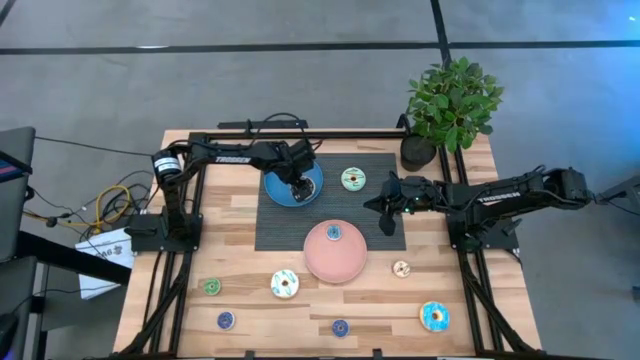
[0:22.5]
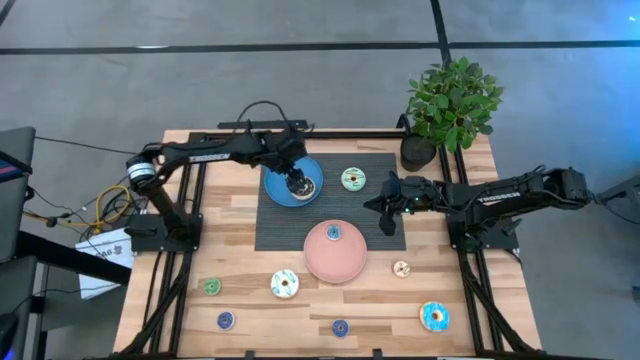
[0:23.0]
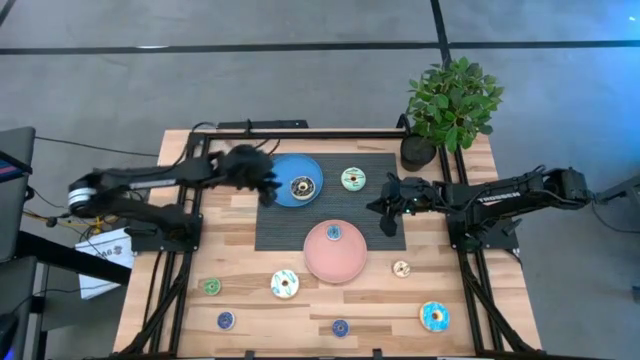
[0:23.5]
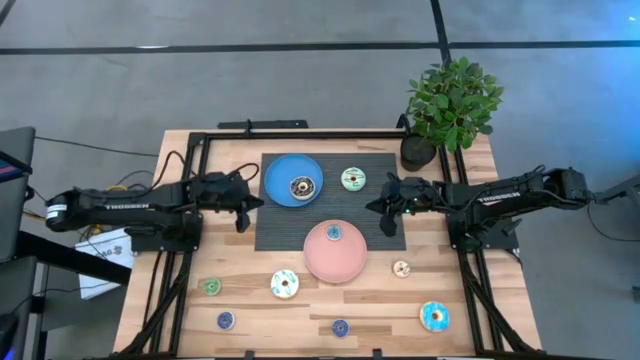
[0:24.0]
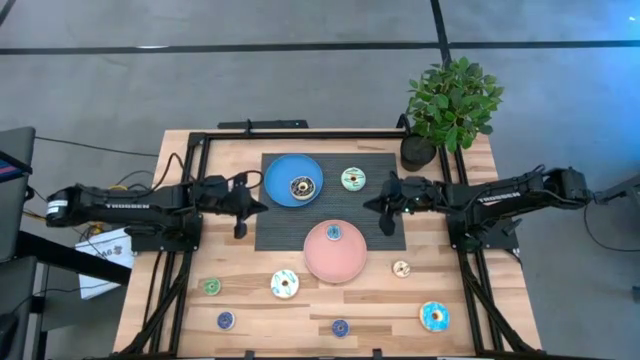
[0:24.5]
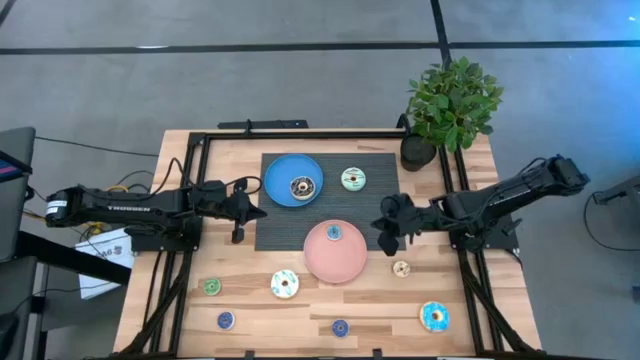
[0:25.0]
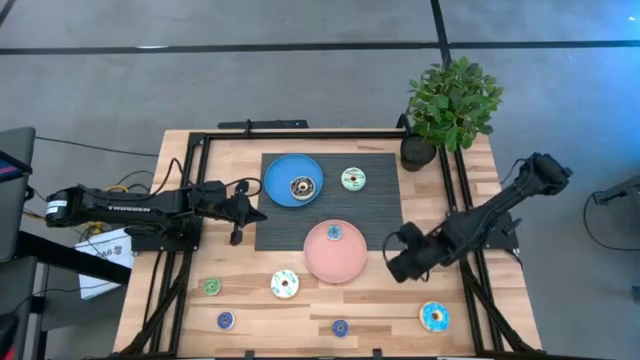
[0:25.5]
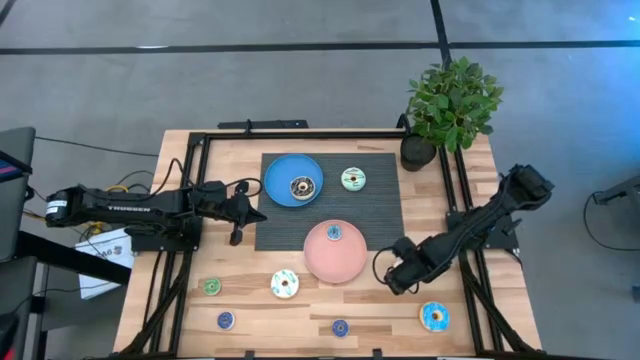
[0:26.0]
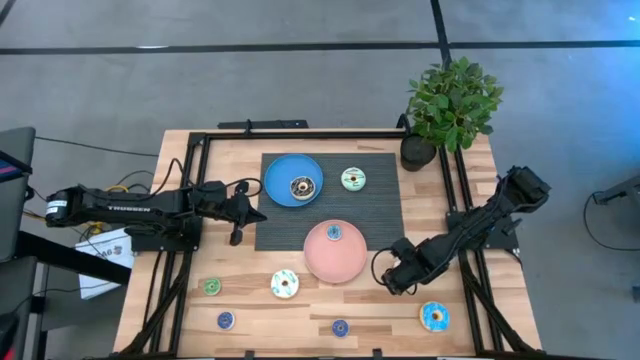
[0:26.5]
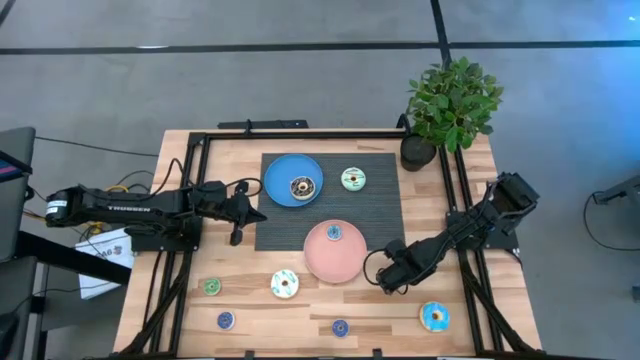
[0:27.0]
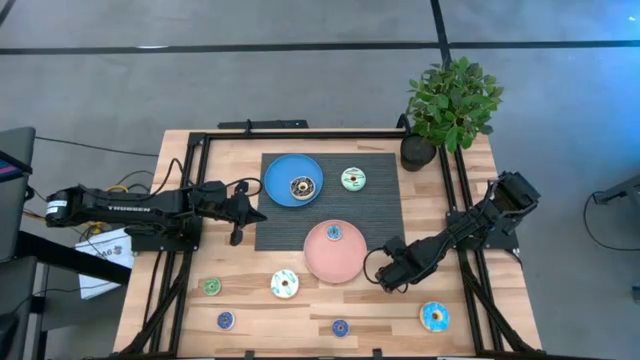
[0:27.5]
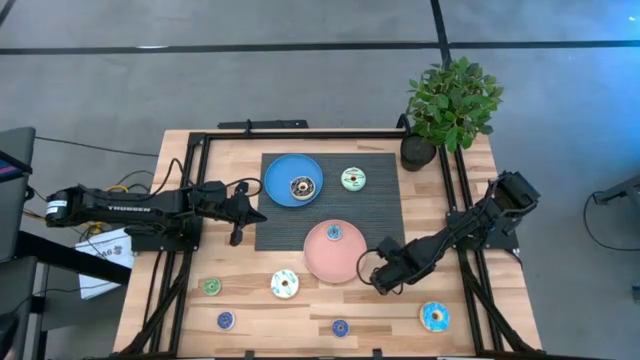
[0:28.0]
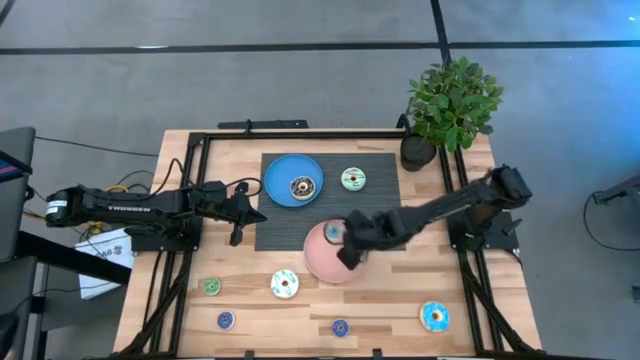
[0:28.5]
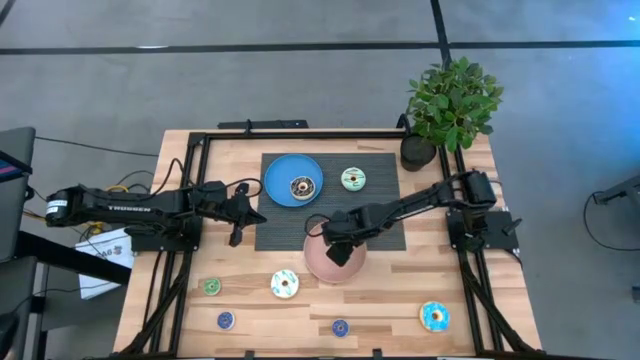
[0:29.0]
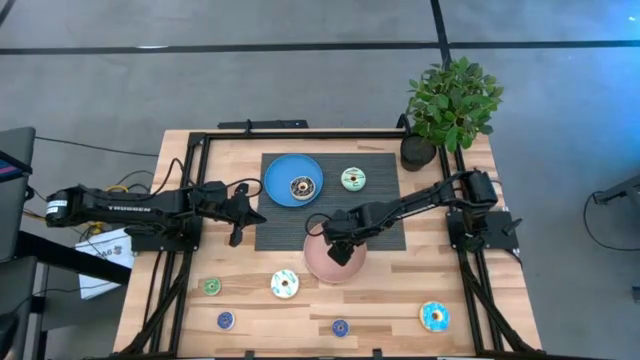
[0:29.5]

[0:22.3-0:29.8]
Task: Pick & Place donuts
Put the small white donut on the pink plate

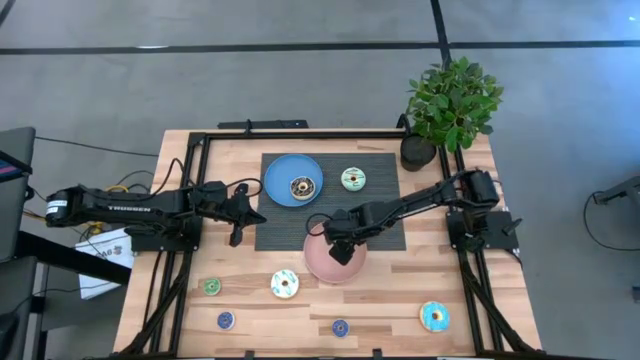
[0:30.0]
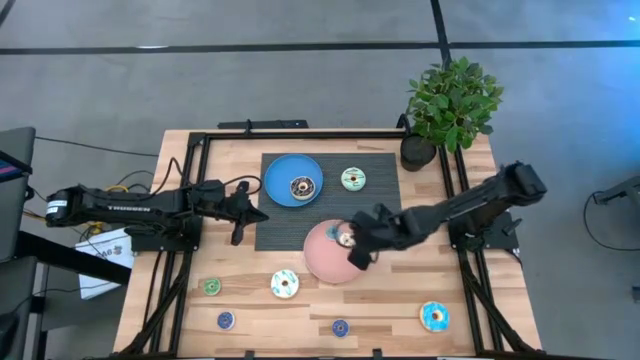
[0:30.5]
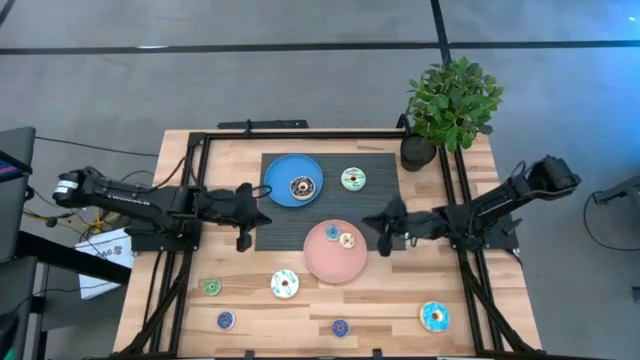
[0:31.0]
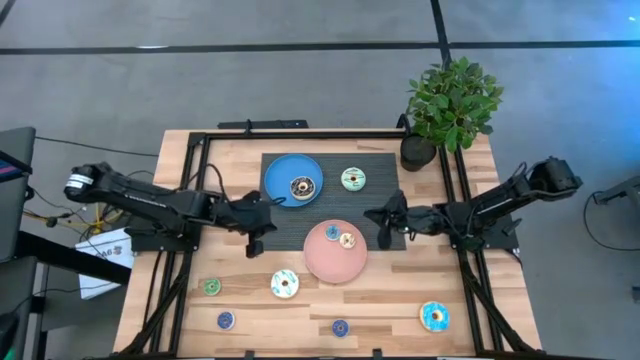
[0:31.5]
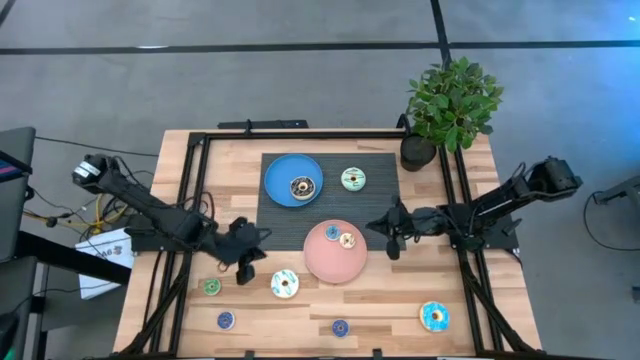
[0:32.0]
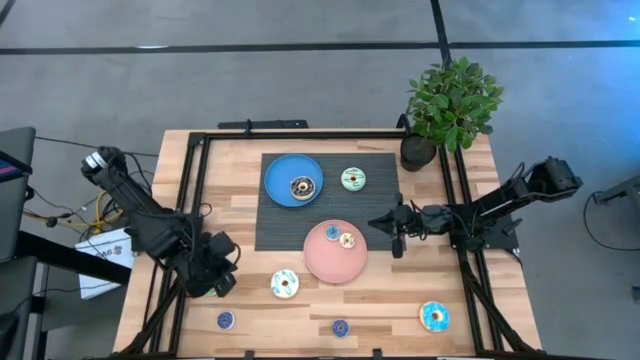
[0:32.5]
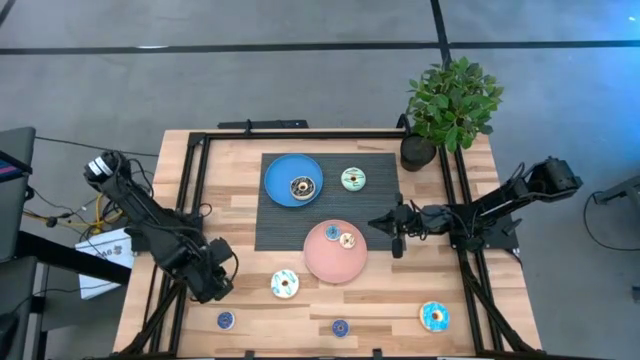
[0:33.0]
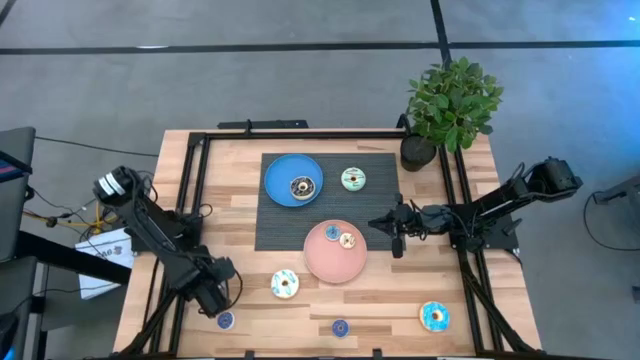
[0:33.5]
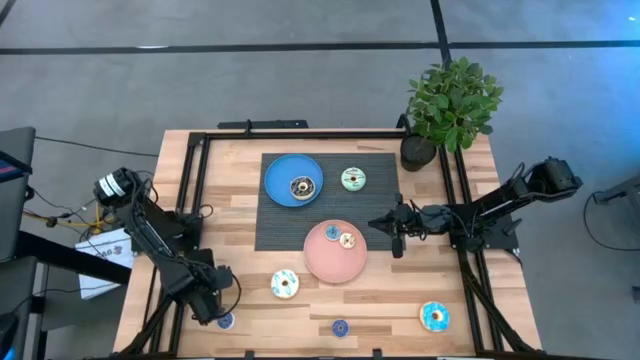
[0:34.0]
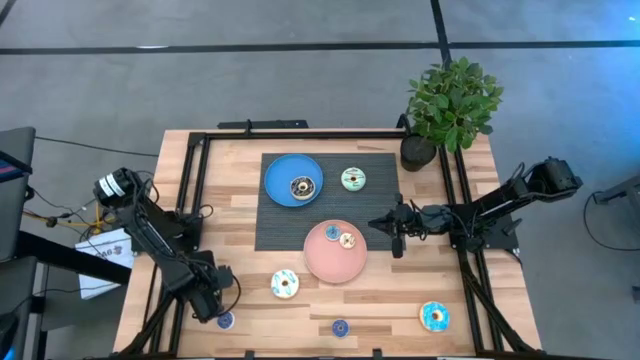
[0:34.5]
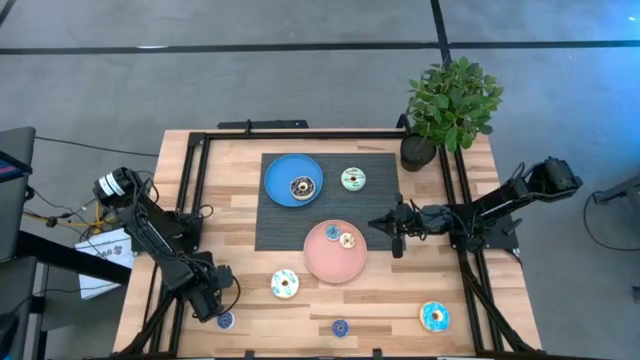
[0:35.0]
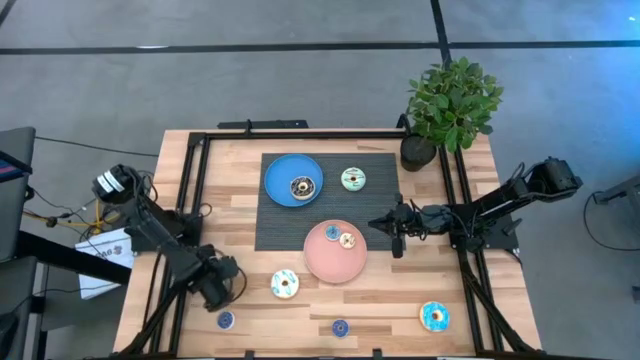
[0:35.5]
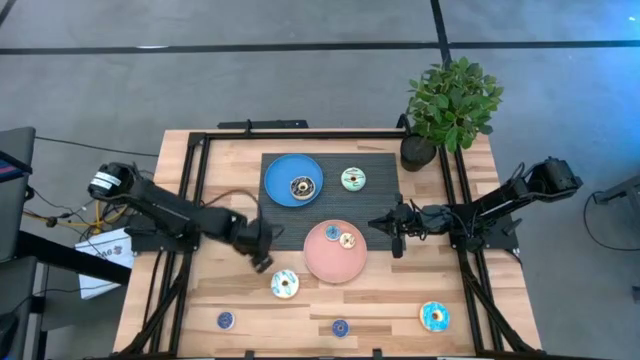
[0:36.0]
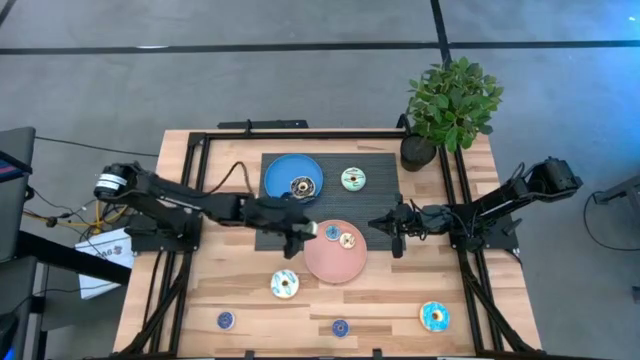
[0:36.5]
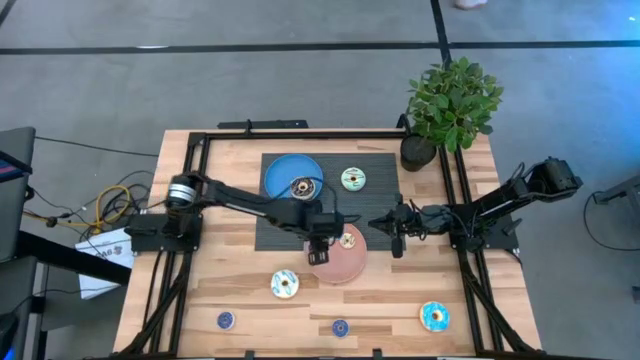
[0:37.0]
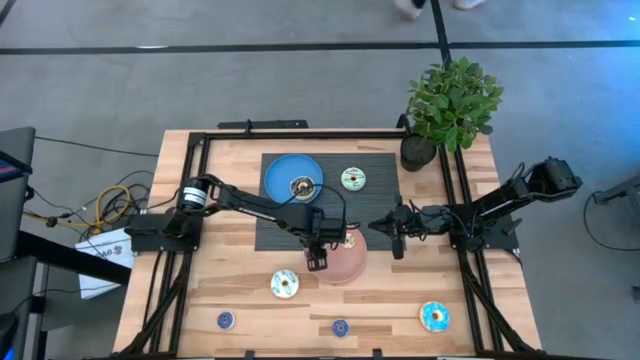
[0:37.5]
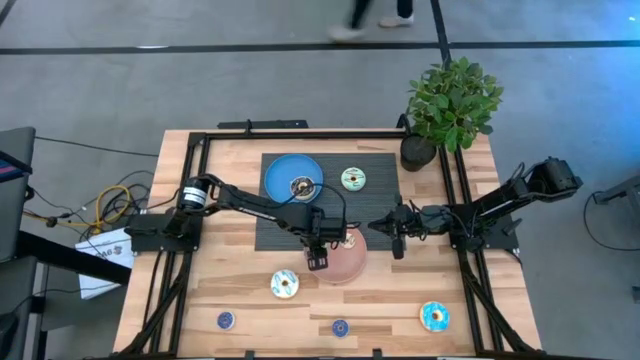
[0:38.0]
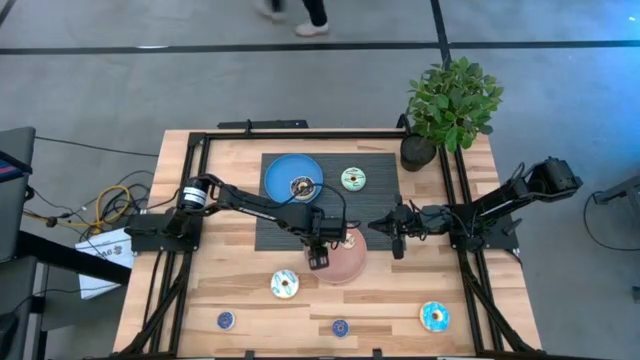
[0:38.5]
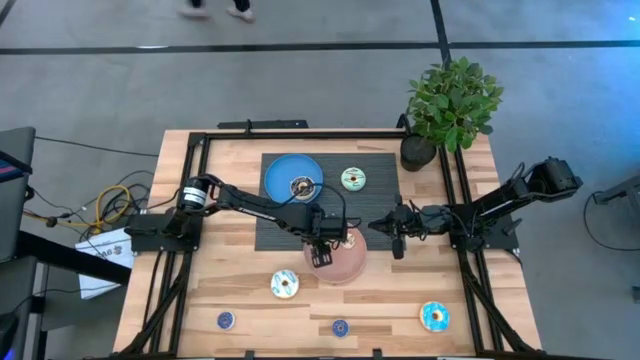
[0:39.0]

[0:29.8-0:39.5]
Put the small green donut on the pink plate

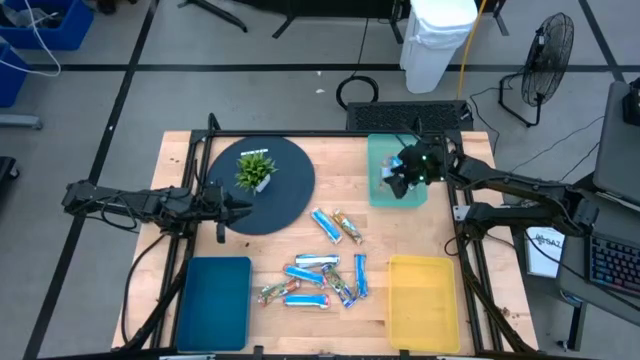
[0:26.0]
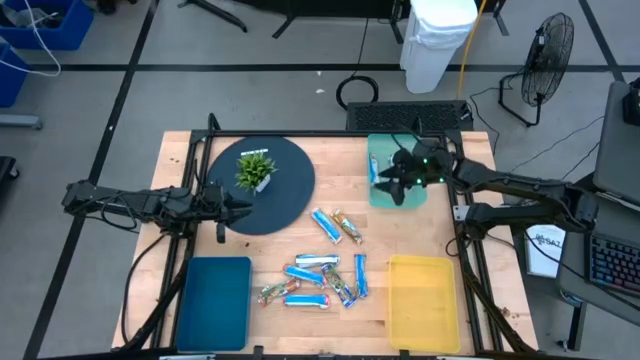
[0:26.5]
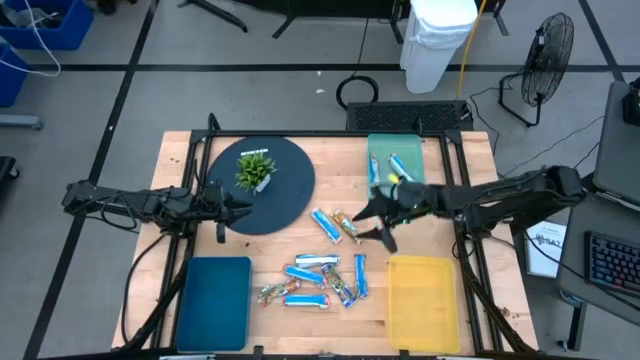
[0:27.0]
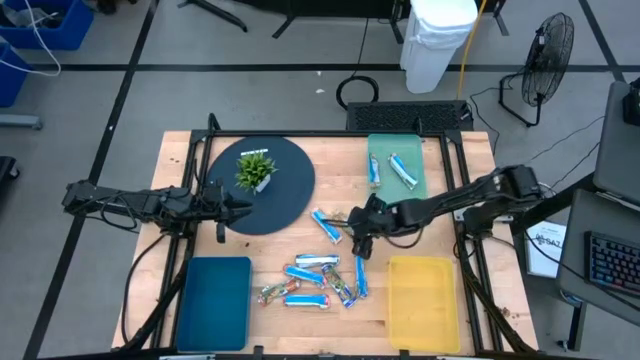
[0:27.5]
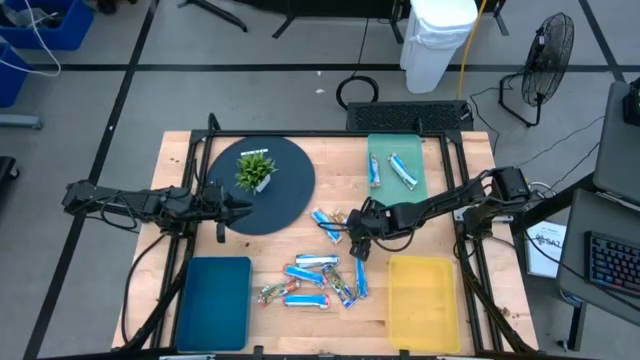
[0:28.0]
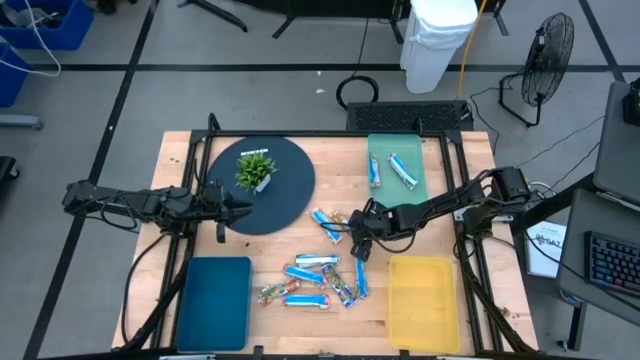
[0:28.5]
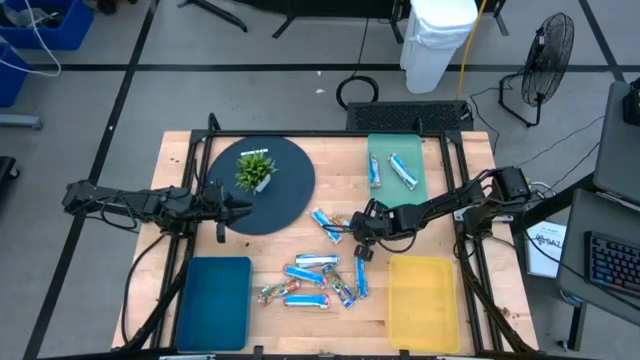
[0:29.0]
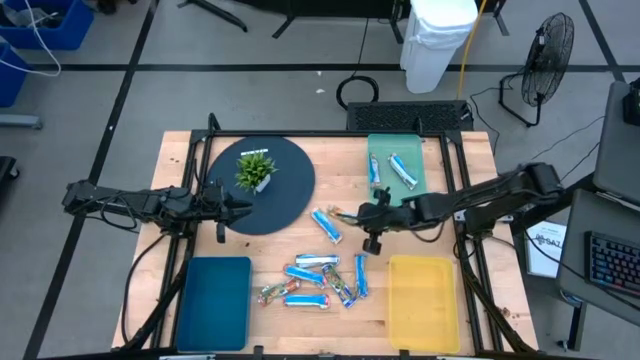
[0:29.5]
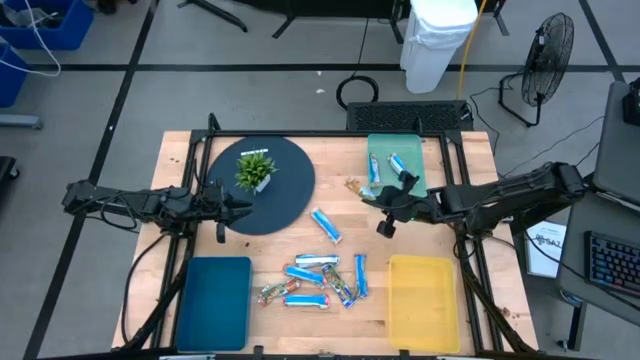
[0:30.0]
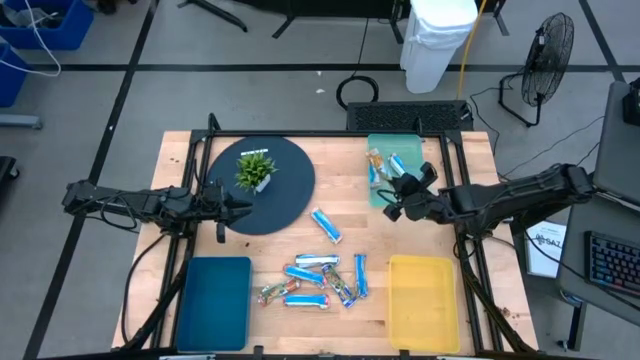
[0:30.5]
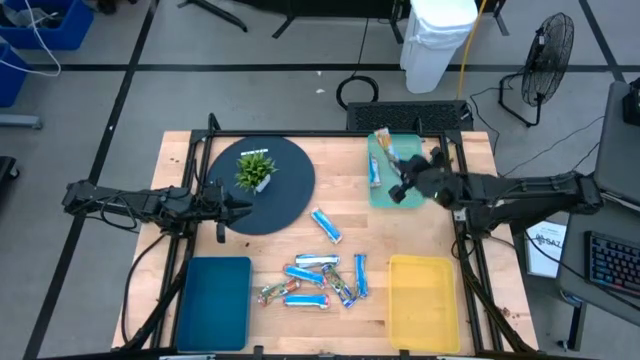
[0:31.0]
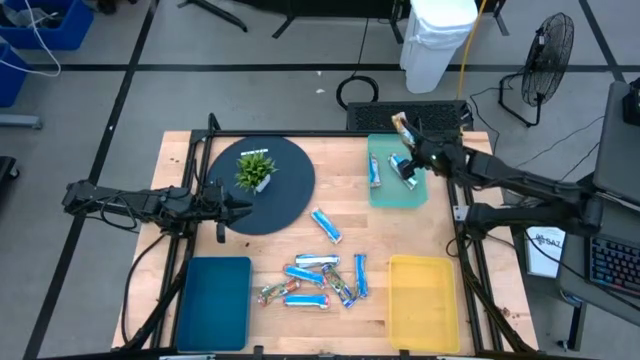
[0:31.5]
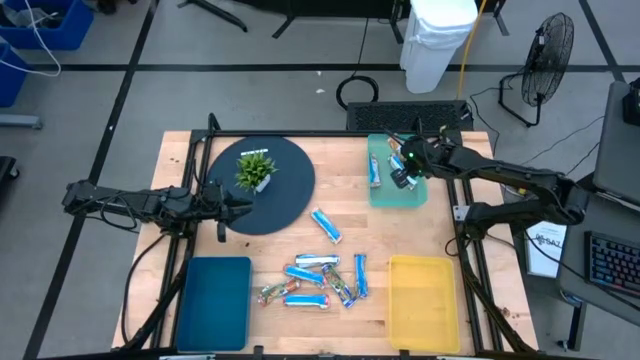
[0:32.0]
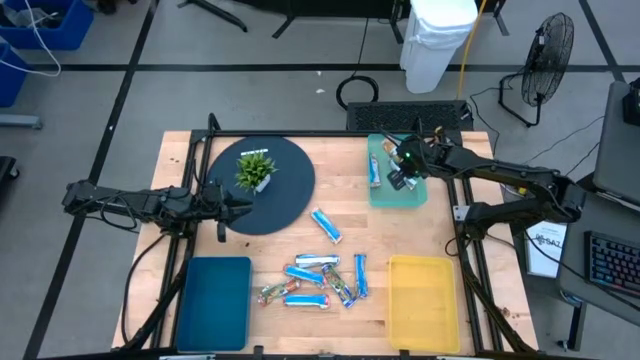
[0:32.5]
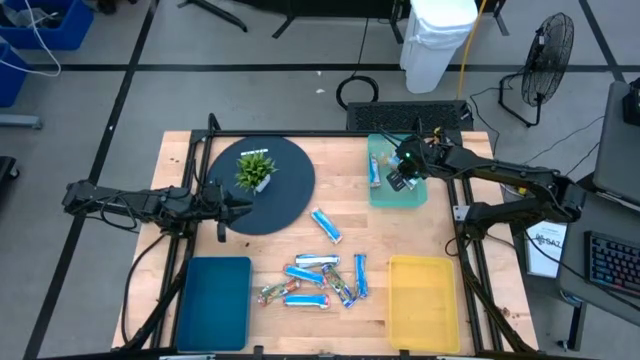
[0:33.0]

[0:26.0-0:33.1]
Task: Pick and place Granola Bars by type
Put the yellow granola bar into the green bin
